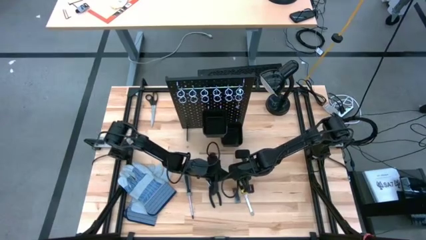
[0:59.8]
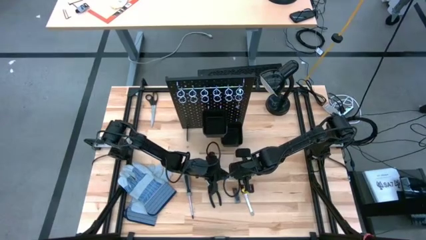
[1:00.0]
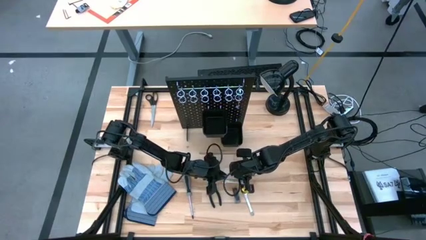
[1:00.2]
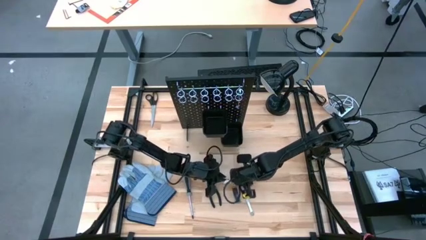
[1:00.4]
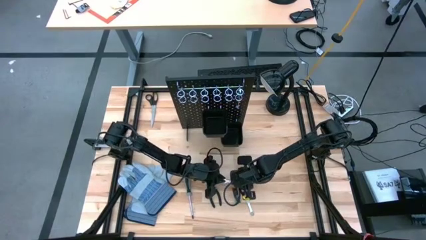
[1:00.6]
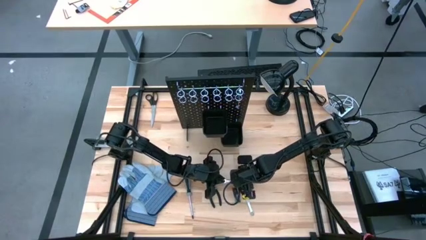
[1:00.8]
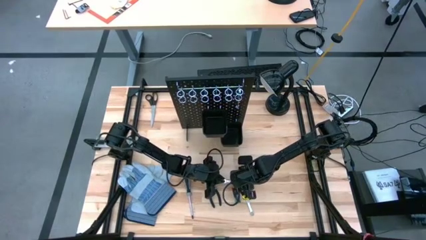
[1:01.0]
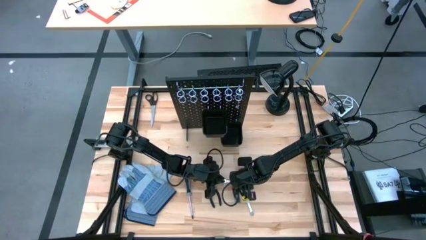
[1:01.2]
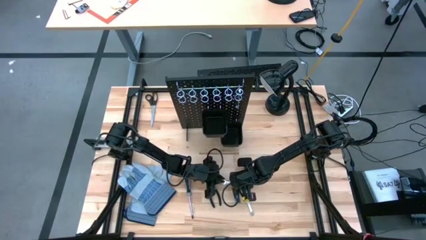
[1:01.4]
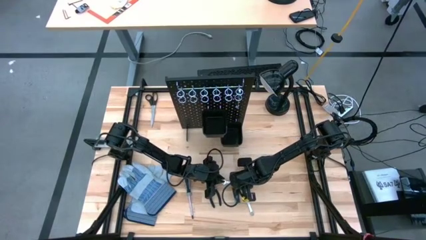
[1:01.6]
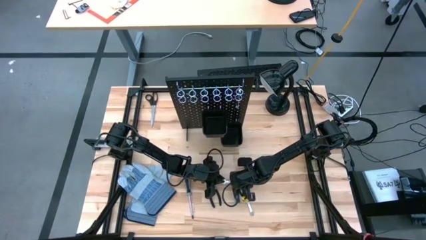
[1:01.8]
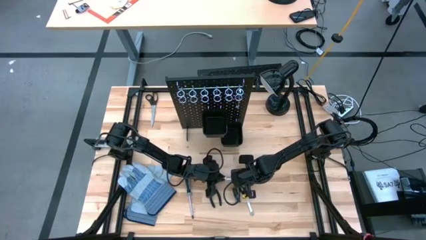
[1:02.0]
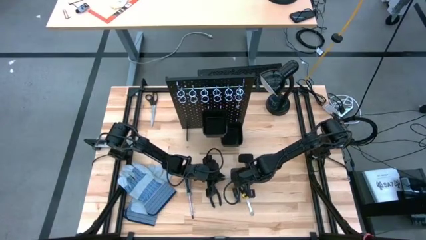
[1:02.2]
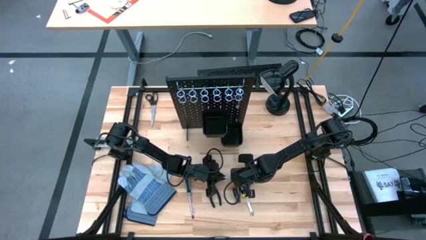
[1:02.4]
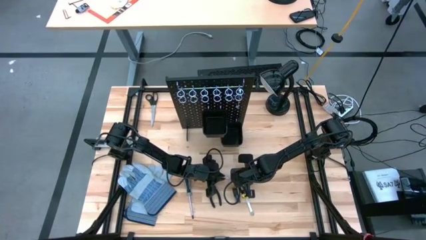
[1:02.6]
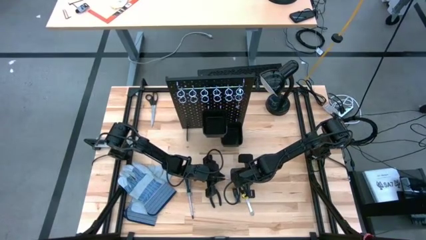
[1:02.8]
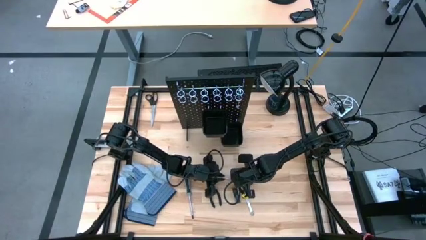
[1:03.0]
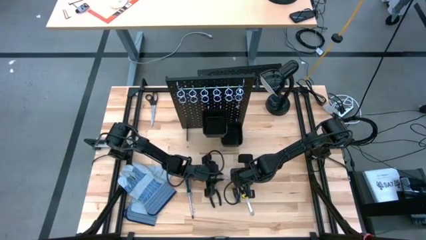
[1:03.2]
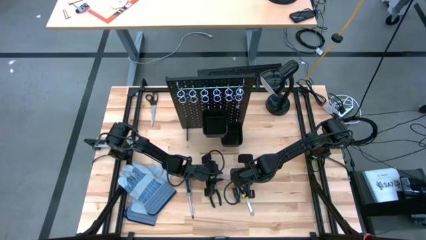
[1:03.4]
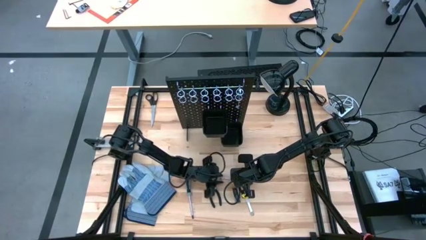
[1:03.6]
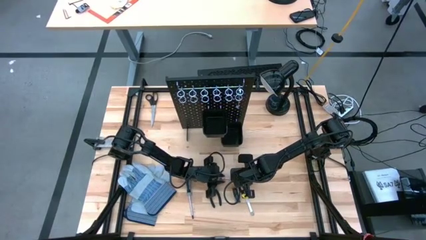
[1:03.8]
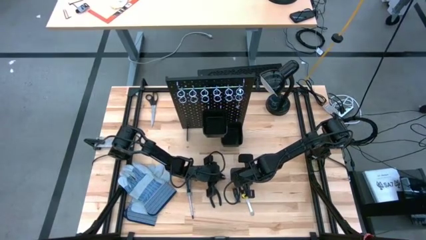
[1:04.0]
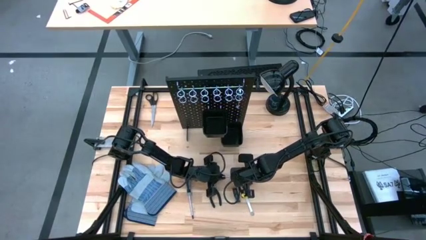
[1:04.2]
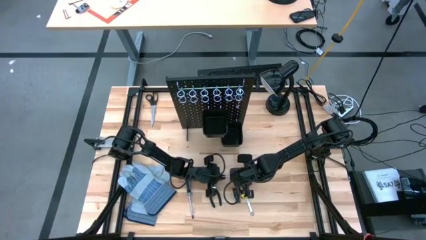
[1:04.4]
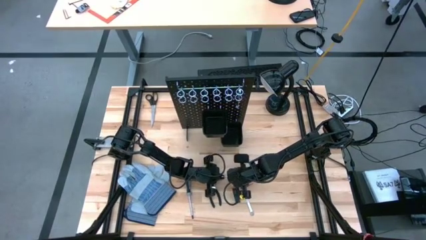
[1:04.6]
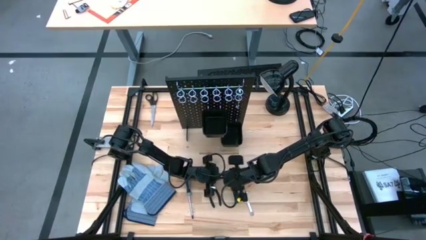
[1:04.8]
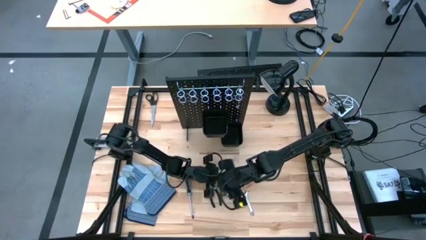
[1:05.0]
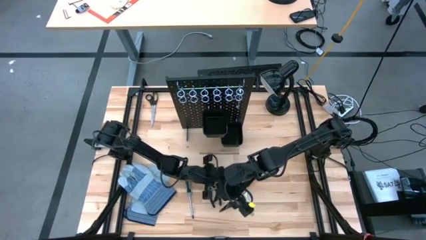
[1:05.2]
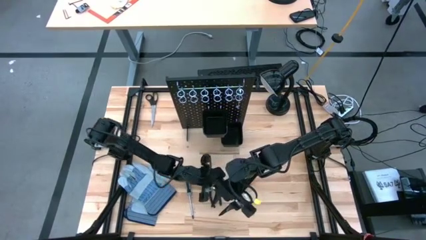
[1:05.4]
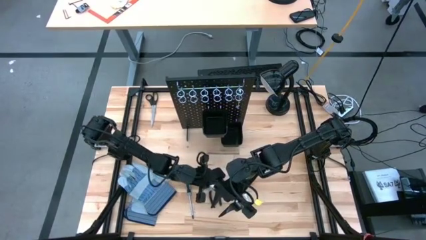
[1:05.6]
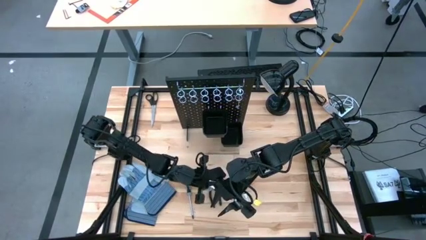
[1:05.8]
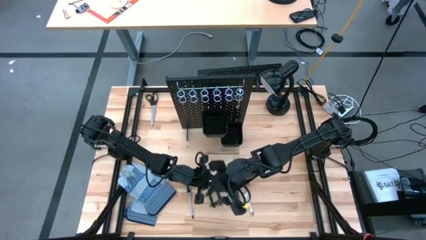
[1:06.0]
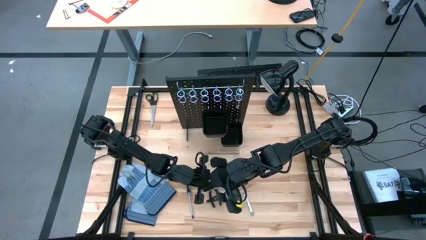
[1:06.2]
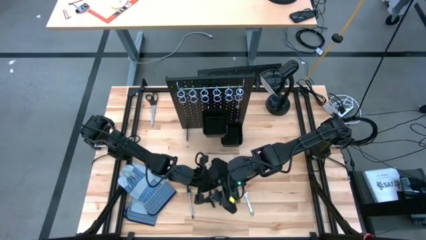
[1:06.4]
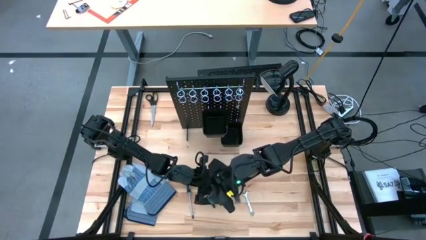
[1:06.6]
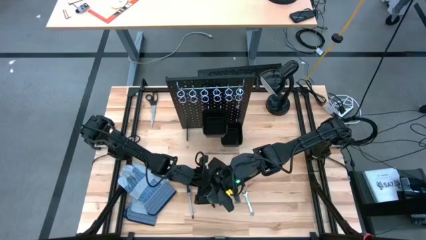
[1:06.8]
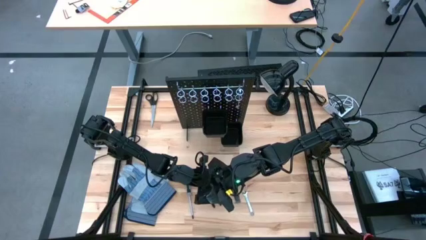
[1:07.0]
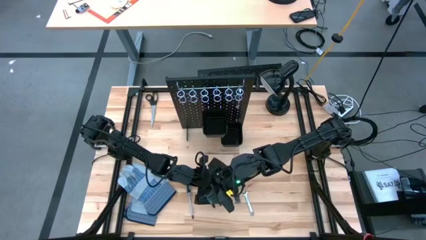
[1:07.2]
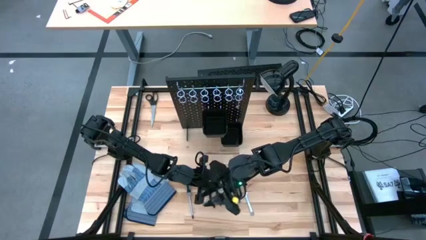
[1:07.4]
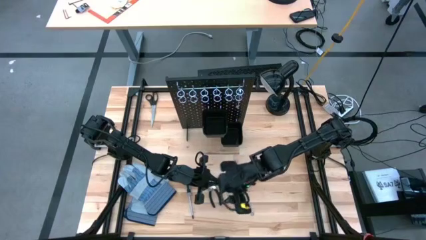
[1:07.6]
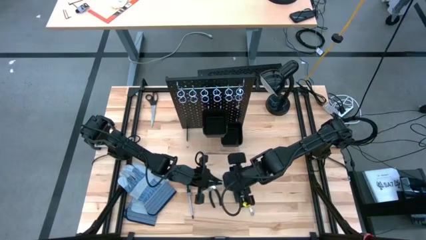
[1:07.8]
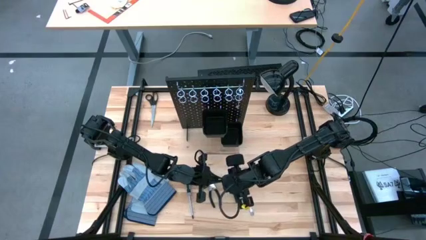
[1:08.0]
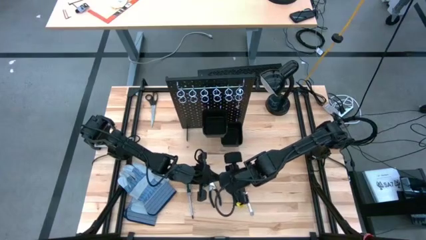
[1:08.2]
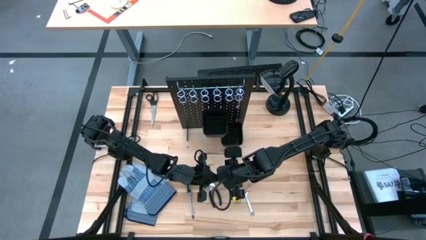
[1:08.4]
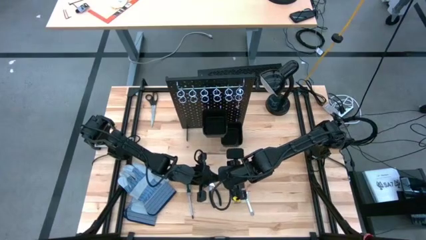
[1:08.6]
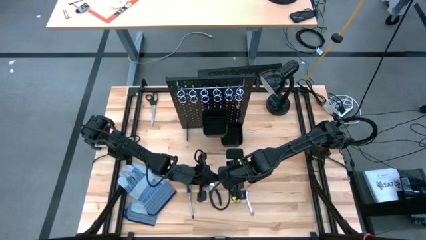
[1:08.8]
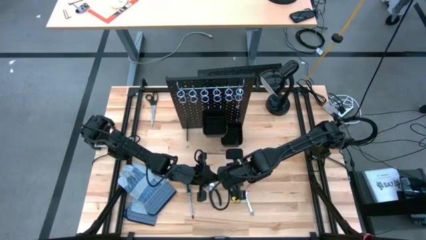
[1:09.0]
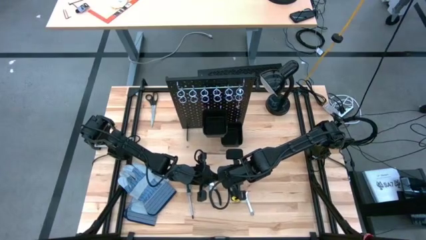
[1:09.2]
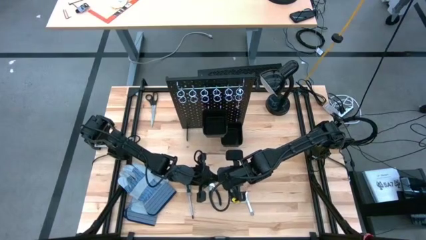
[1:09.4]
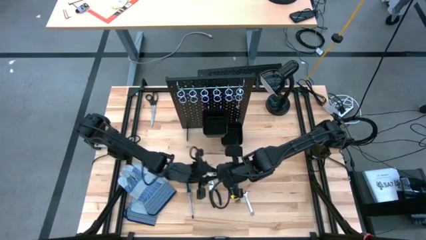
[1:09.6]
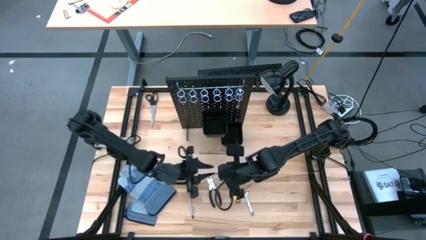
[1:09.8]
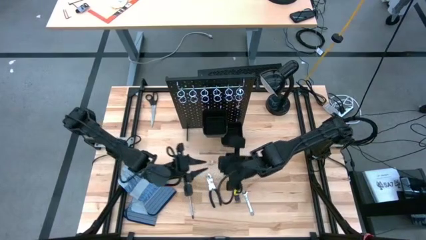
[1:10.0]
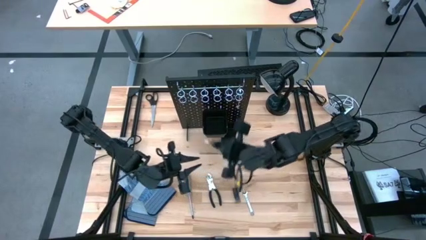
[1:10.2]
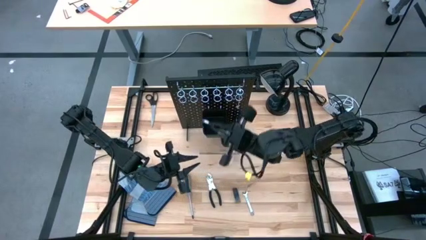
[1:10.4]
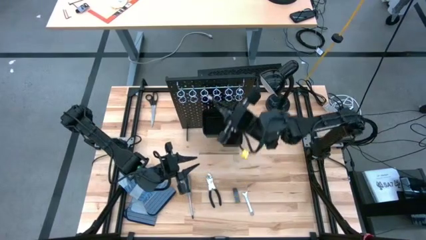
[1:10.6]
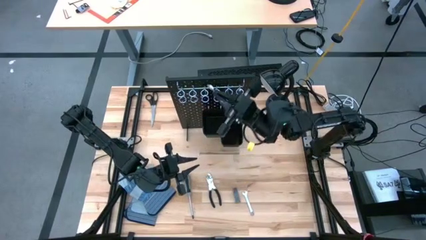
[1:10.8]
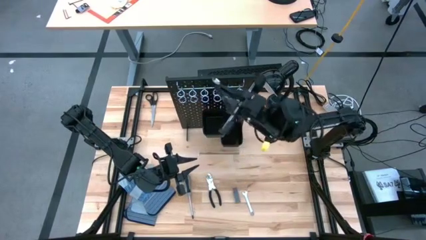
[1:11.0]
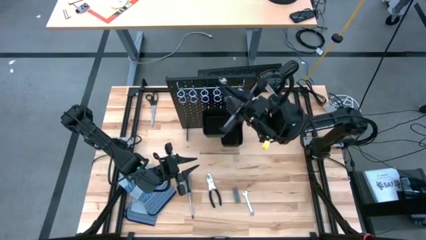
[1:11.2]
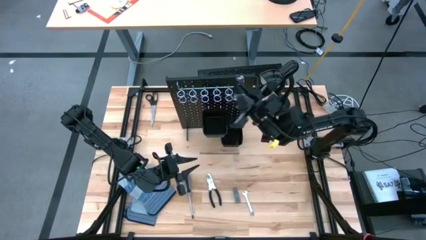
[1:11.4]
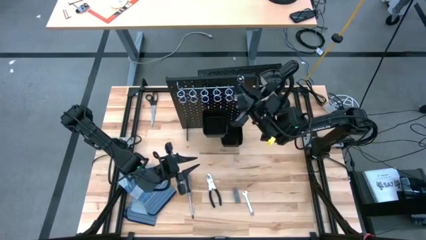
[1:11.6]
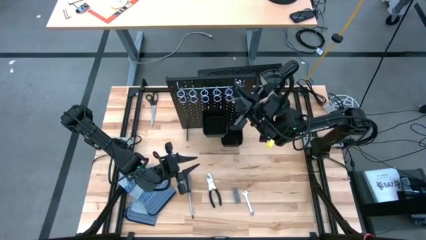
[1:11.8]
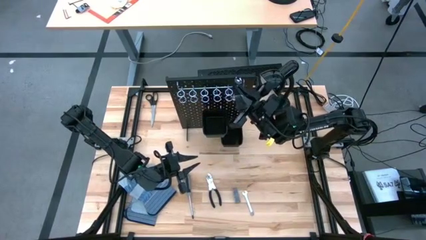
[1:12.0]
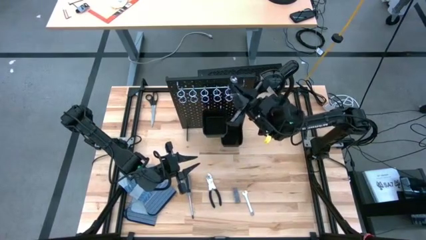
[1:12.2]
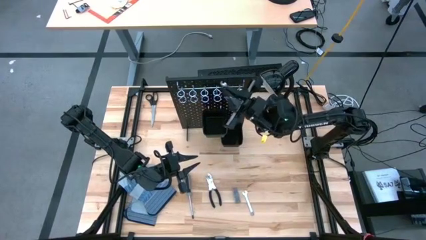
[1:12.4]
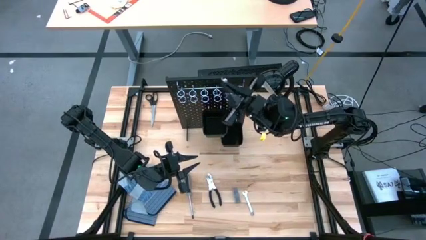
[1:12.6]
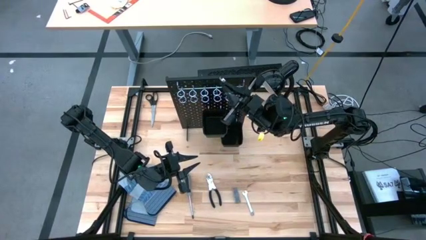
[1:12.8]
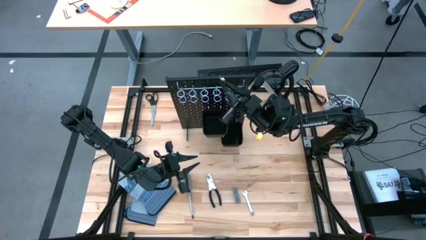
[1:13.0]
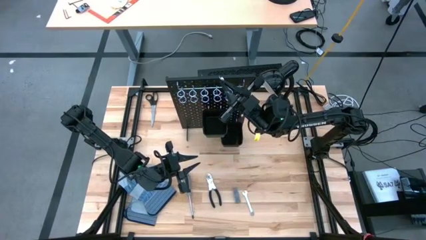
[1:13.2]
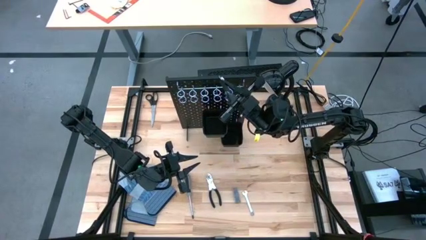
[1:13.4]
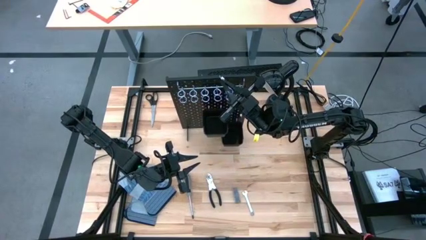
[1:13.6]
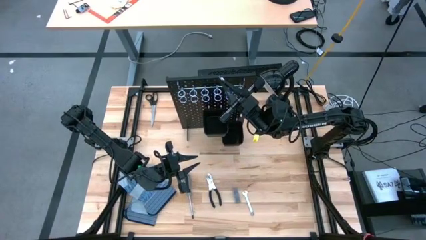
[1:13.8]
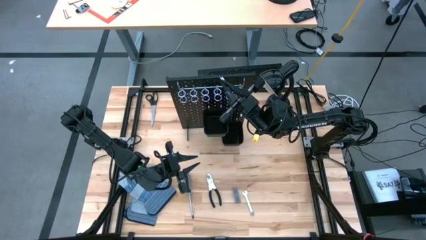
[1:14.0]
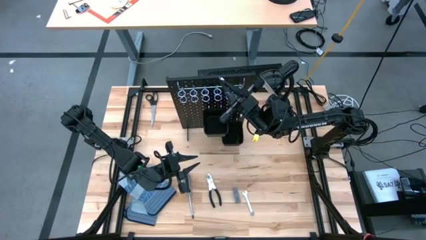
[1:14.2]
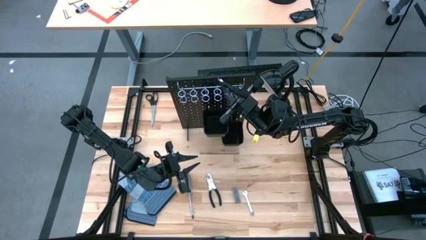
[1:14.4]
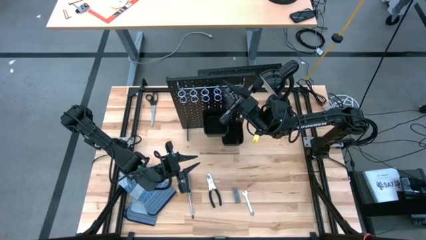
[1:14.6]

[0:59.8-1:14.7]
Task: Hang tools onto peg board
Hang the right silver wrench on the black pegboard

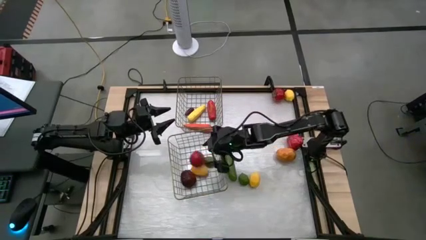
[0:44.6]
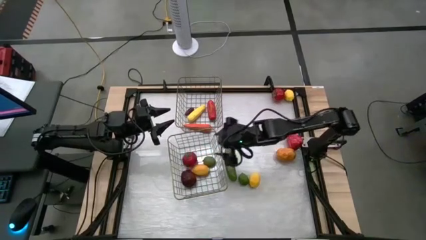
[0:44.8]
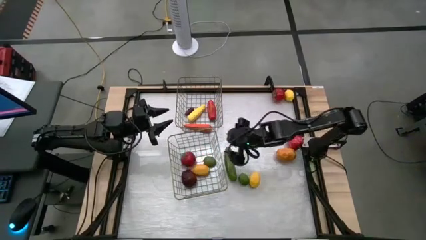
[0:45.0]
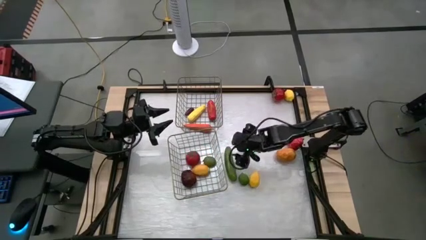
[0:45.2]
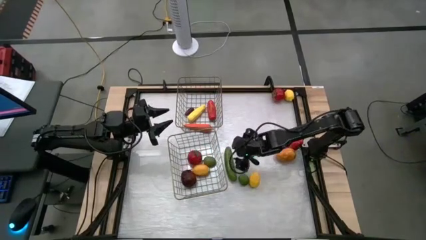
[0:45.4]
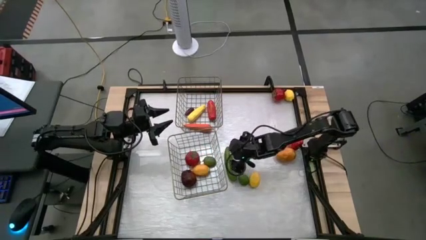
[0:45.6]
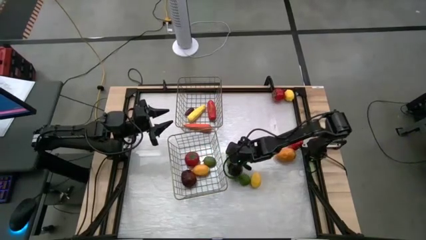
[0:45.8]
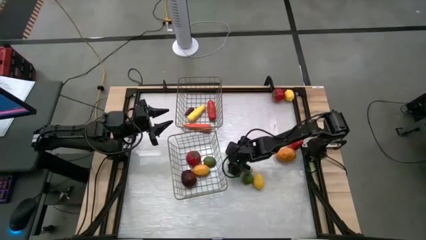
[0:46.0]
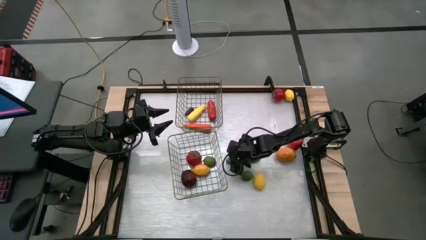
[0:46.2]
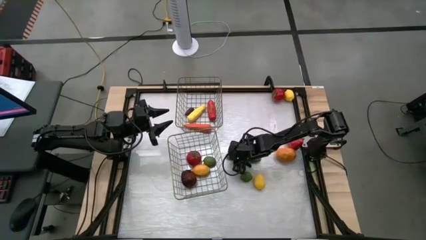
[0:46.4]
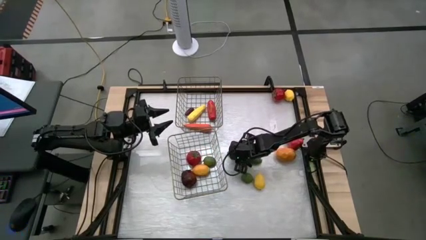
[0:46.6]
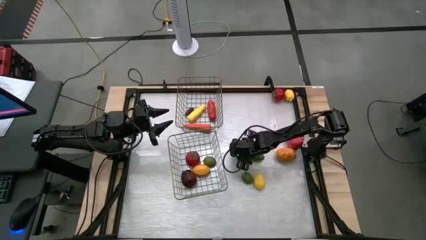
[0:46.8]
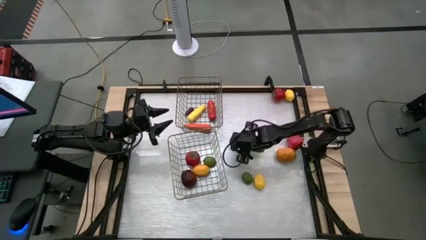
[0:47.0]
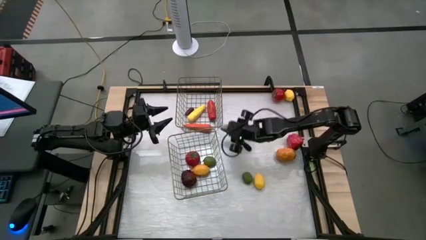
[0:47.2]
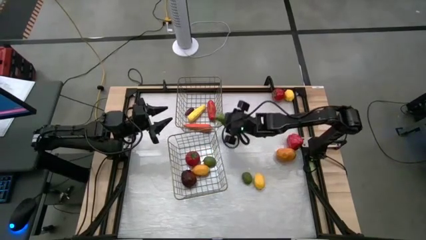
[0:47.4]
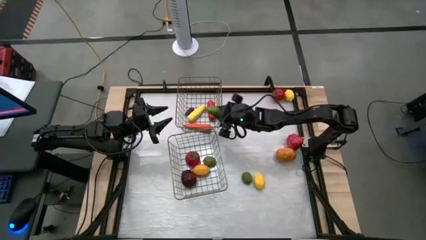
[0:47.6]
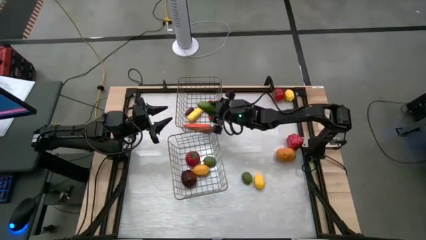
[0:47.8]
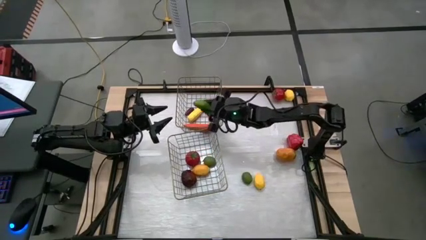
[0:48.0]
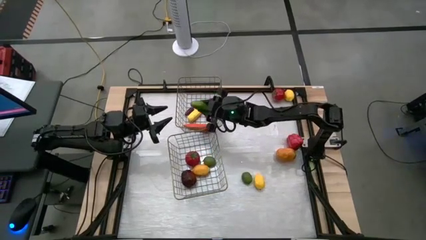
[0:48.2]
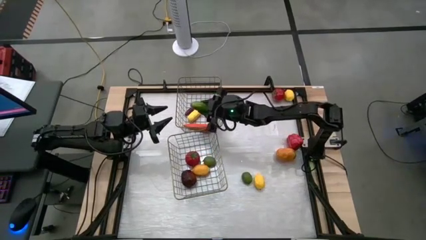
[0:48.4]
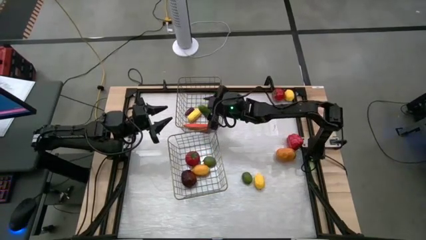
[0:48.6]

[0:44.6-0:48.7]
Task: Sort produce into baskets
Put the green cucumber into the top basket
